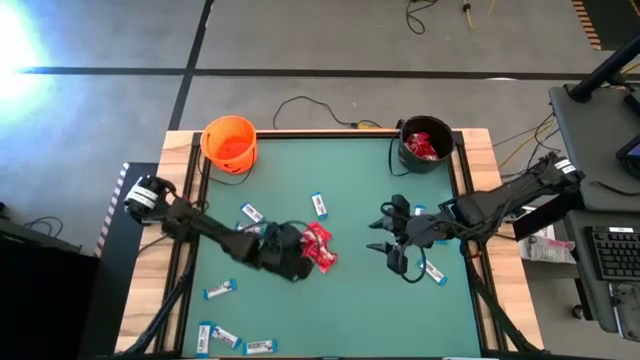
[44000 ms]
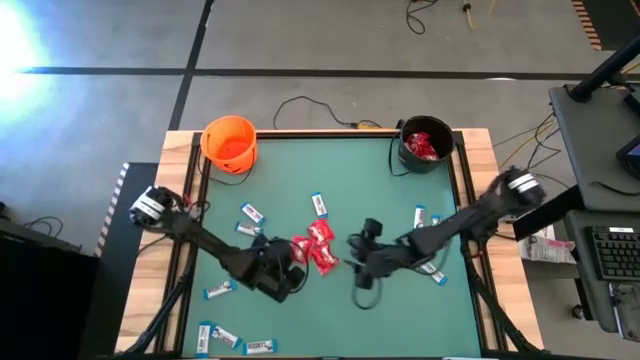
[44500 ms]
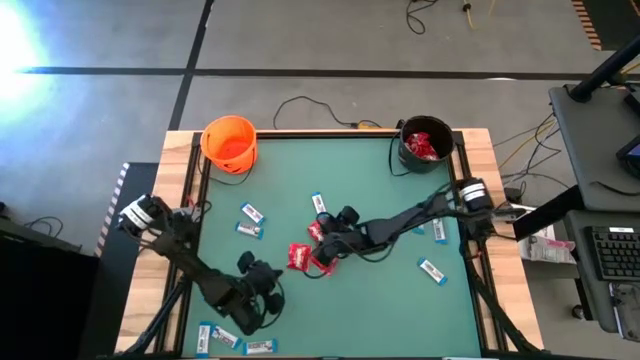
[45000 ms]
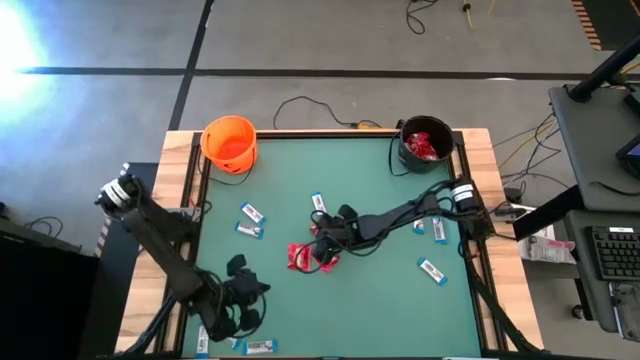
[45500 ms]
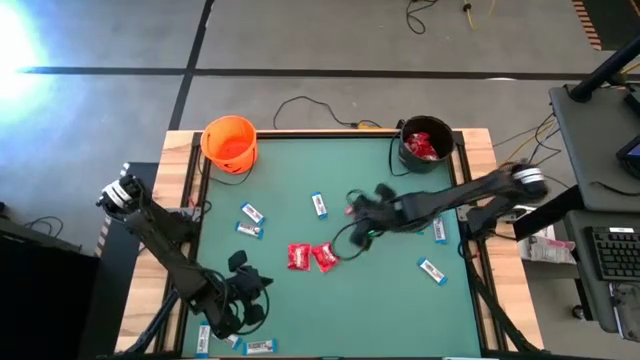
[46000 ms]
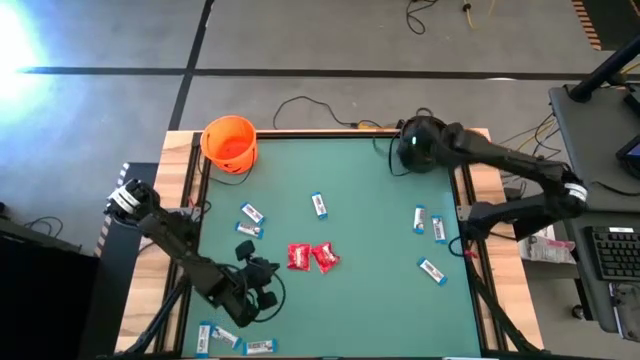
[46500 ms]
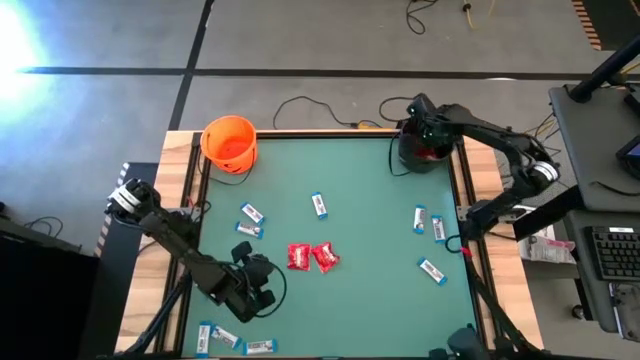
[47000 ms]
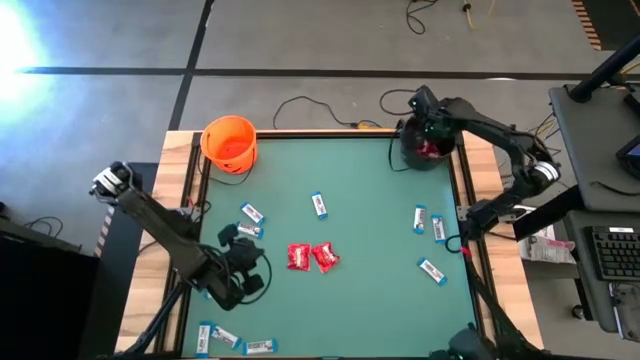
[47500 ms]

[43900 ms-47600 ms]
Task: Sort candy by brand, put in halloween buckets
Put the red candy into the black bucket

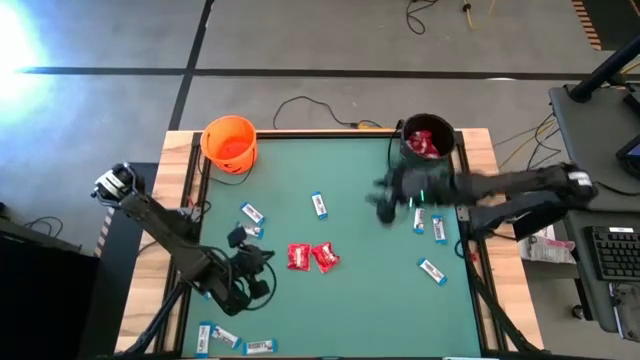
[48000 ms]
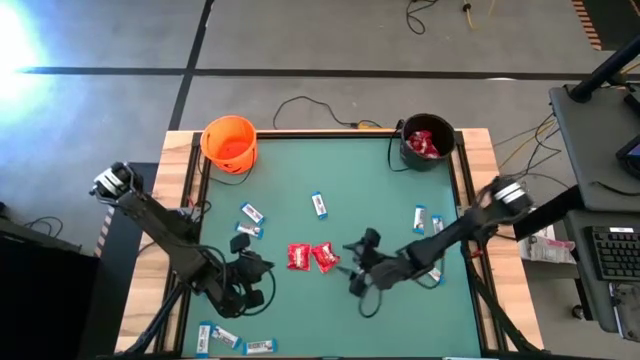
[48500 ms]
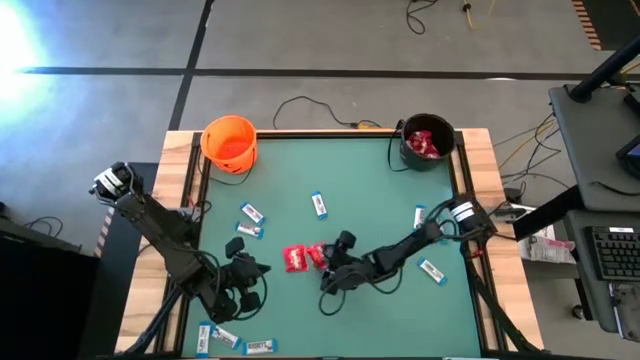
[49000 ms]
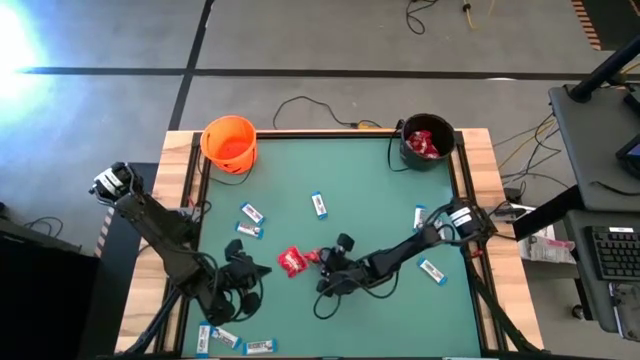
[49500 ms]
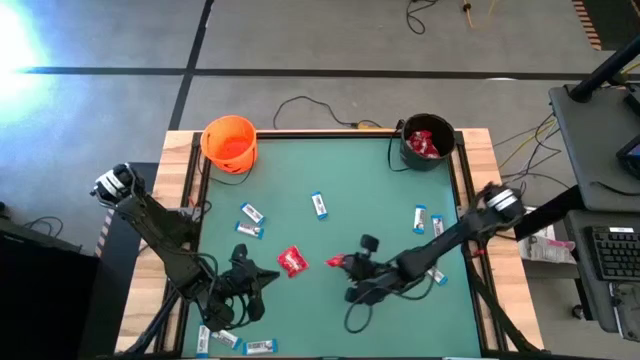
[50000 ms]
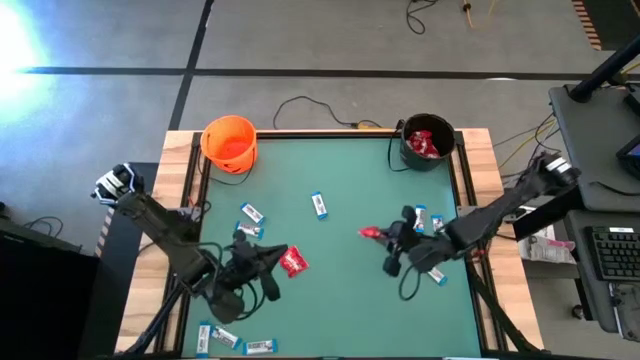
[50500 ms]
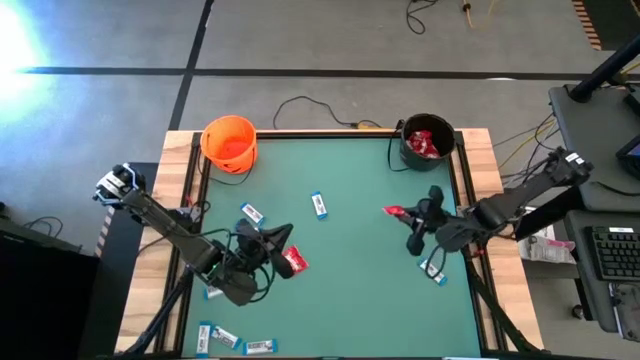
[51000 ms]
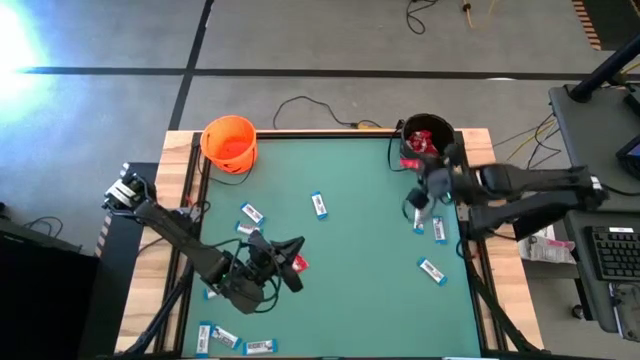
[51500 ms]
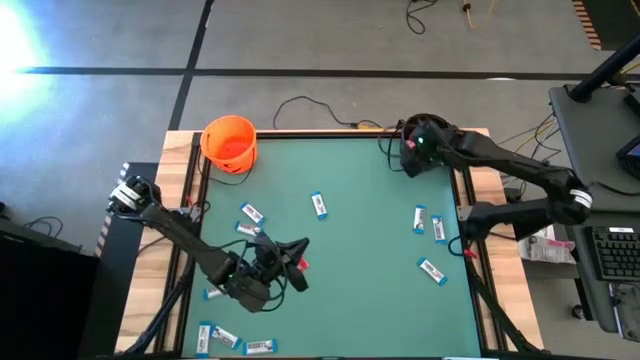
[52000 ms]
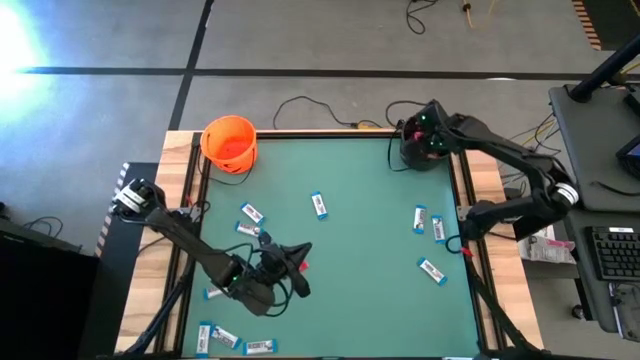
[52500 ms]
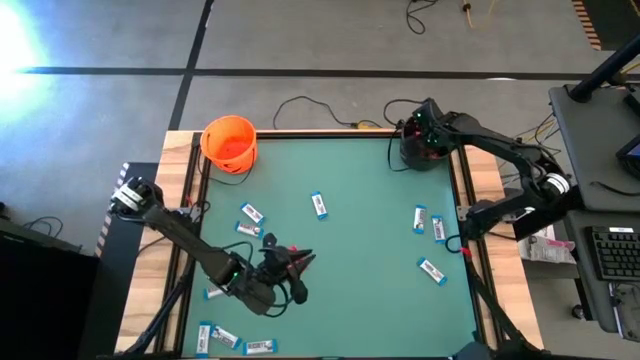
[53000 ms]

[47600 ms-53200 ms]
Put the red candy into the black bucket

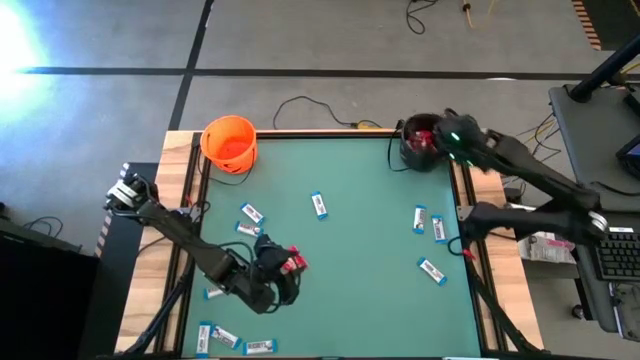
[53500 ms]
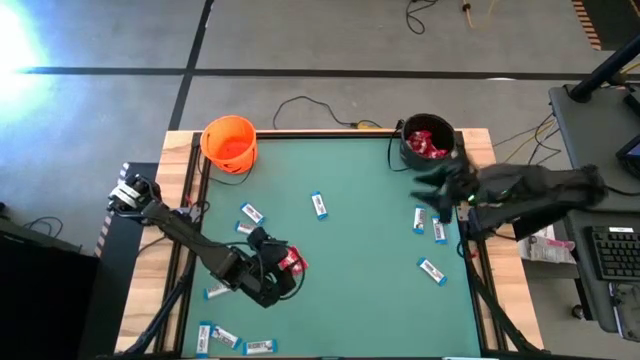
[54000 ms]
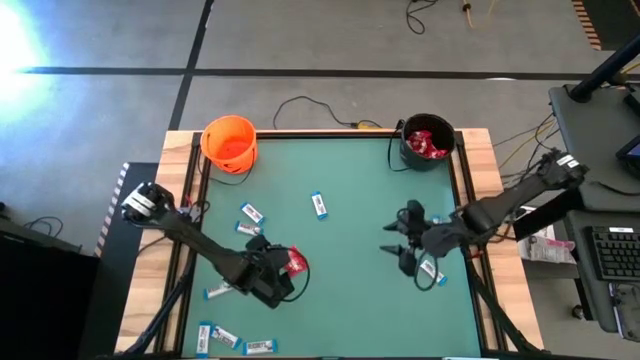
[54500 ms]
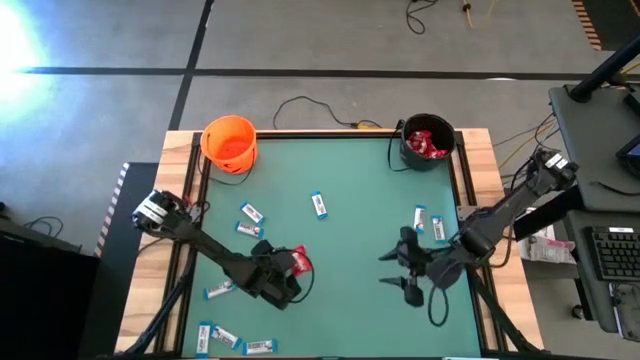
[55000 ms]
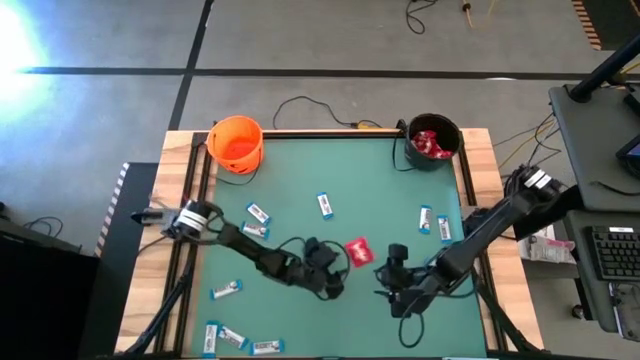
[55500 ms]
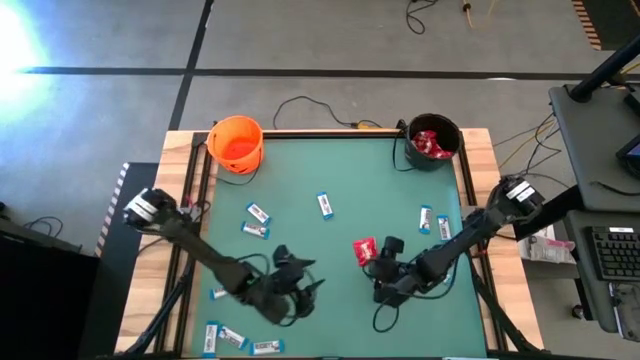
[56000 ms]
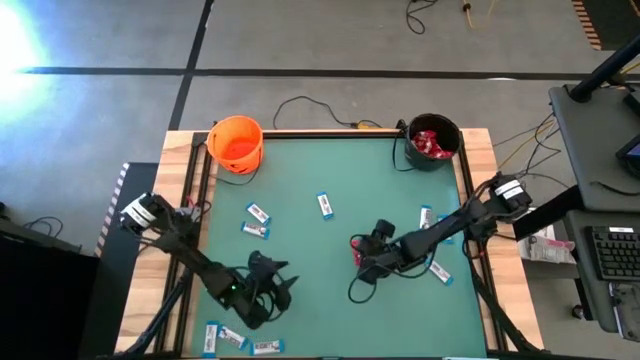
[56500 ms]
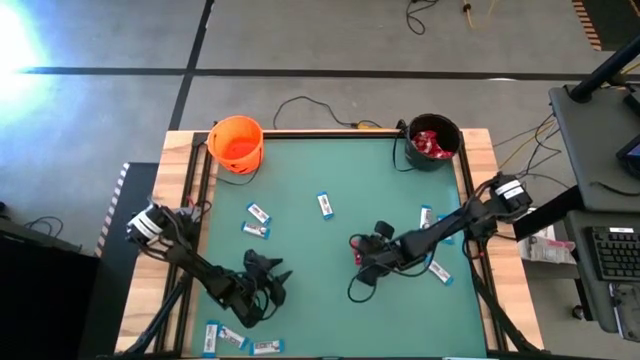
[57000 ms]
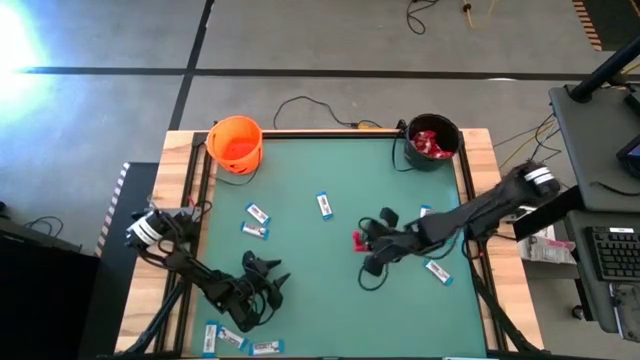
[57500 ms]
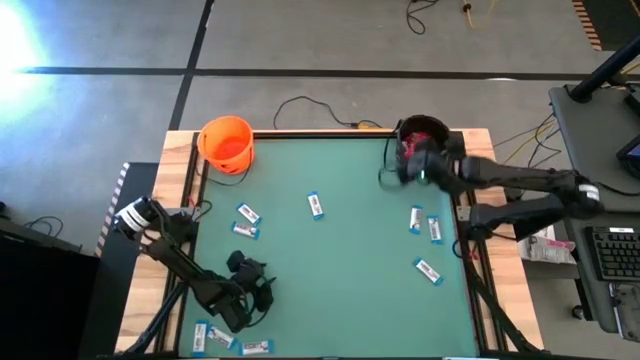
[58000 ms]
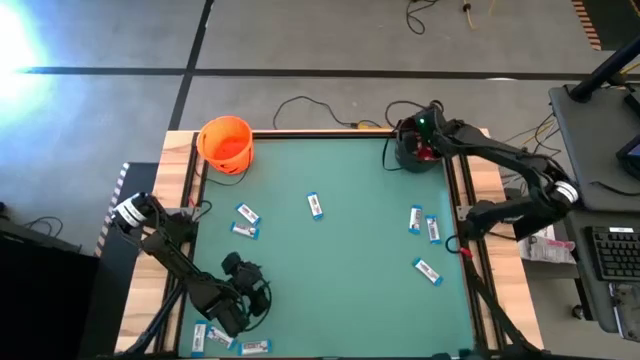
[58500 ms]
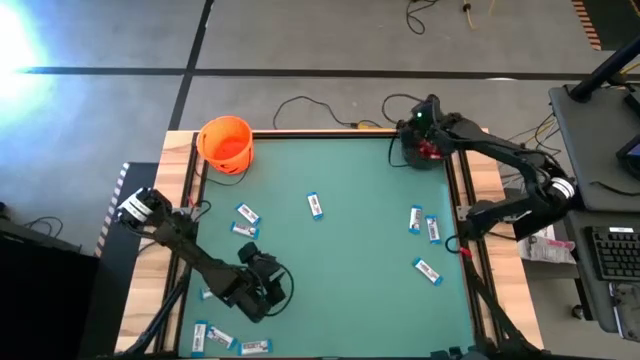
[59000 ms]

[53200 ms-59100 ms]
Put the red candy into the black bucket

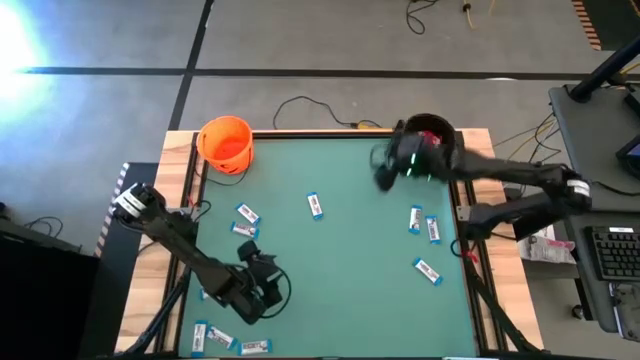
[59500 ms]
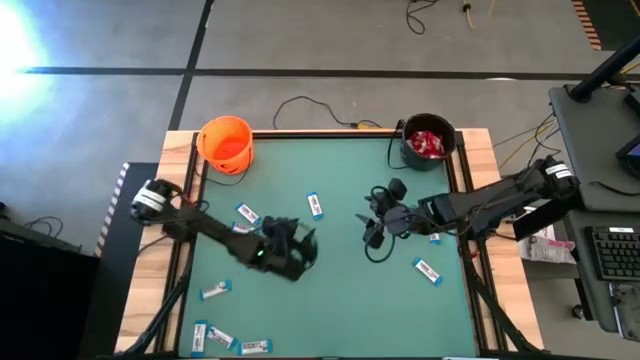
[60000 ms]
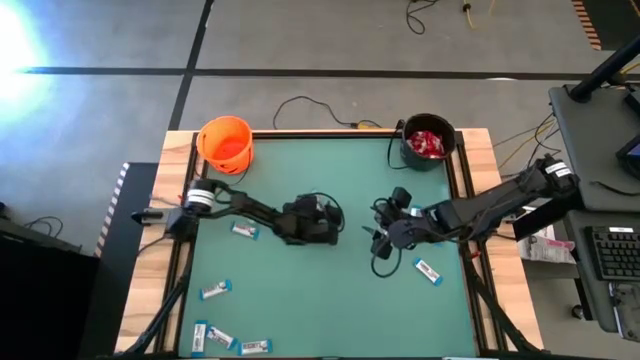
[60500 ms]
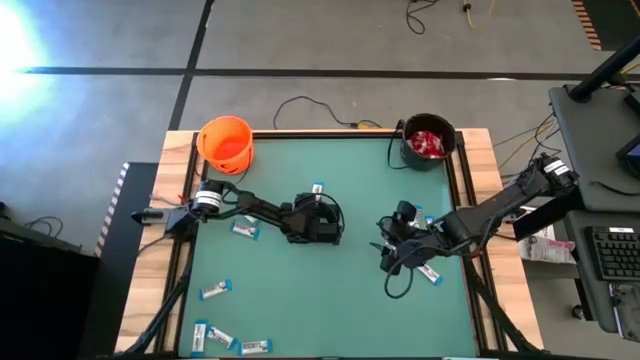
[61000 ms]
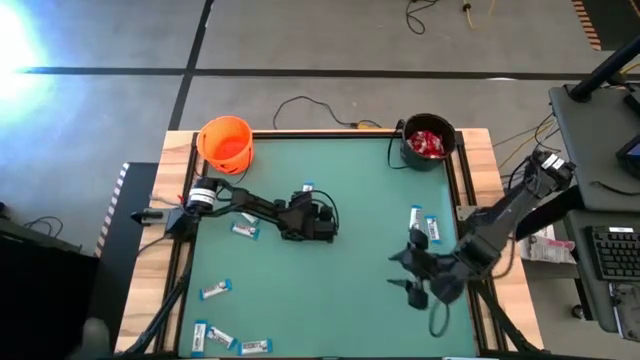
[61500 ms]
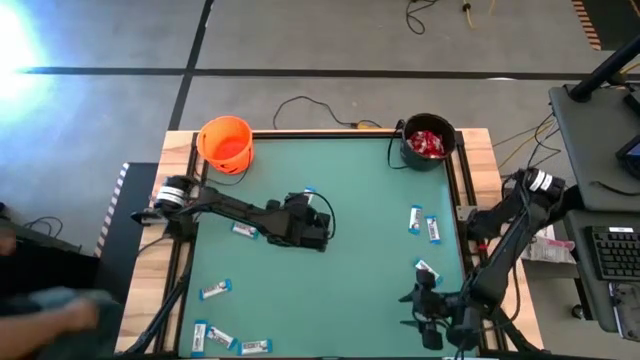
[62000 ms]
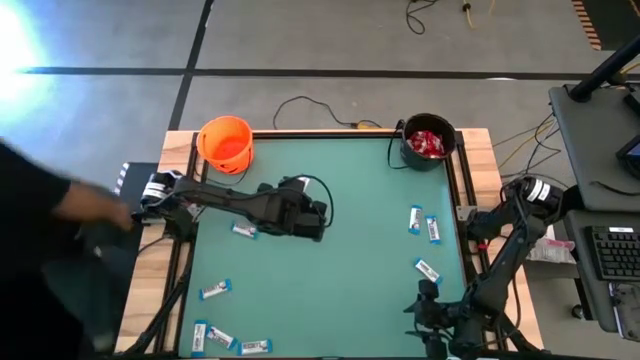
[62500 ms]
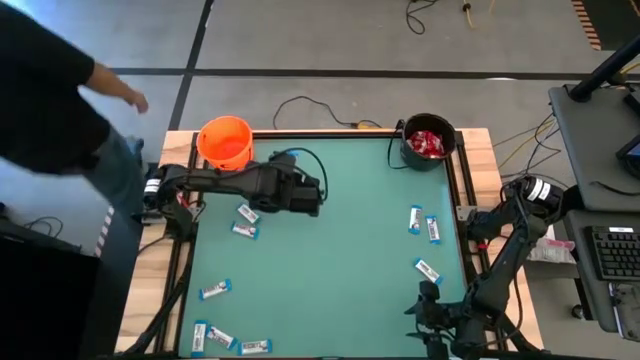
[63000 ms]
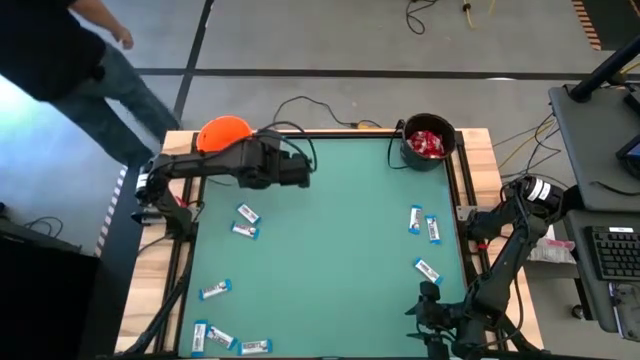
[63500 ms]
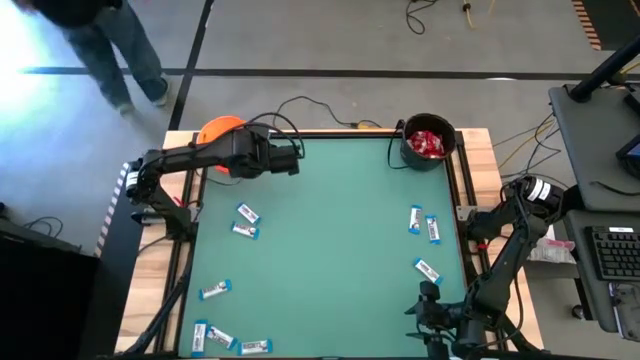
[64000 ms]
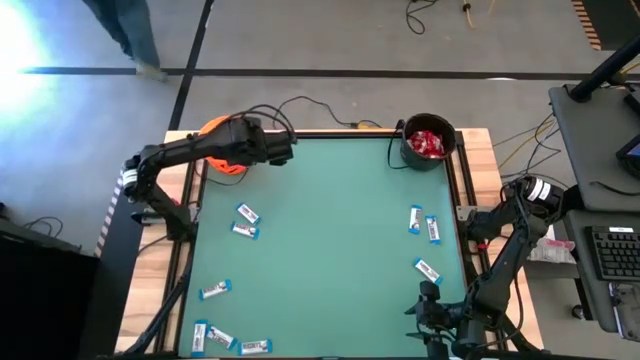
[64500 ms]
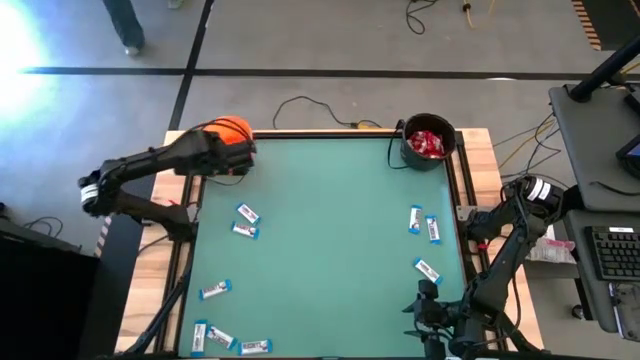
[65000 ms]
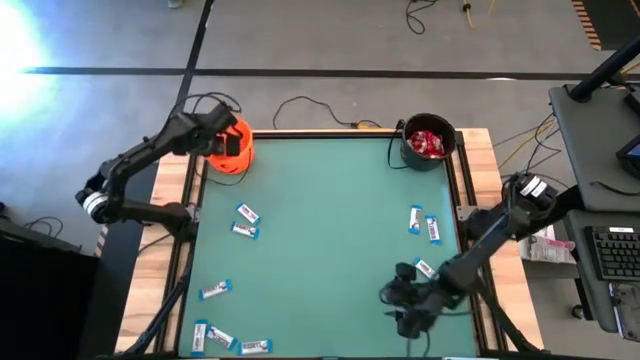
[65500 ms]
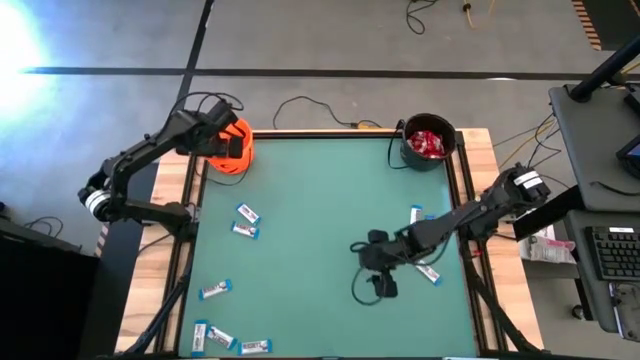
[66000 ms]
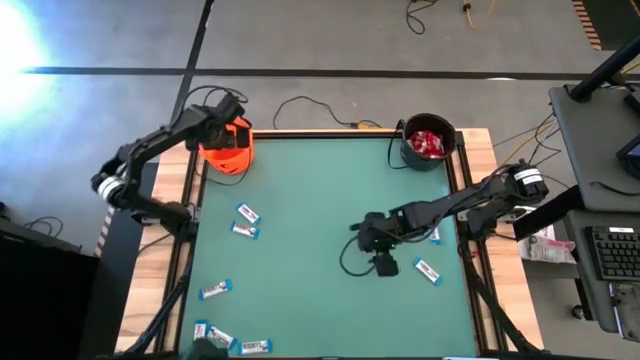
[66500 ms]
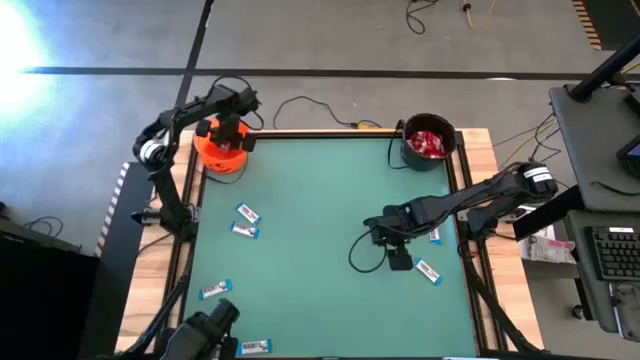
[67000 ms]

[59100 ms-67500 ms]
Put the white chocolate into the orange bucket
